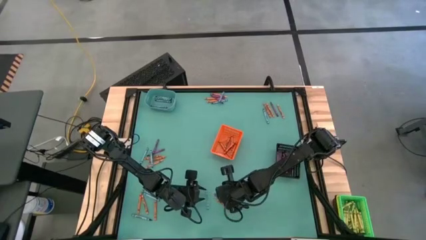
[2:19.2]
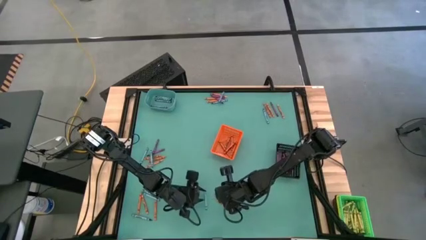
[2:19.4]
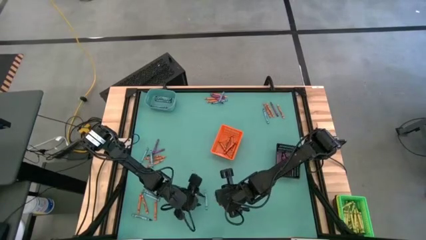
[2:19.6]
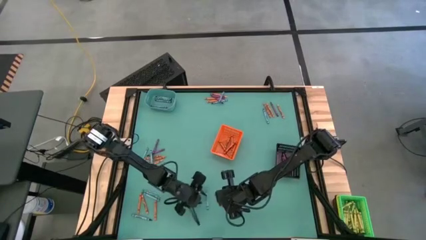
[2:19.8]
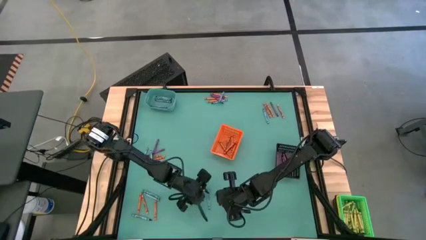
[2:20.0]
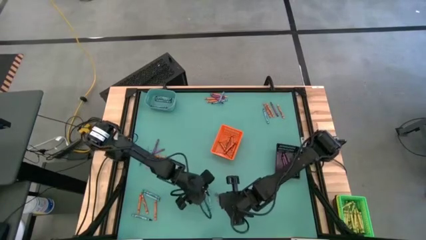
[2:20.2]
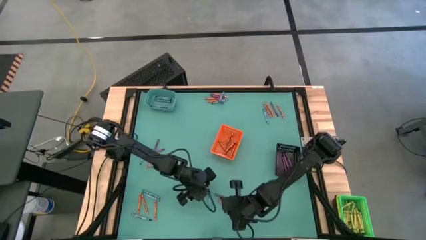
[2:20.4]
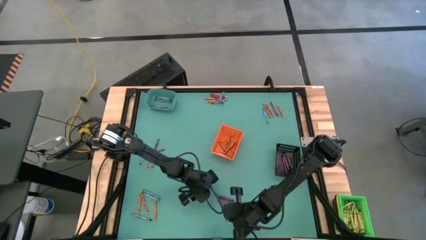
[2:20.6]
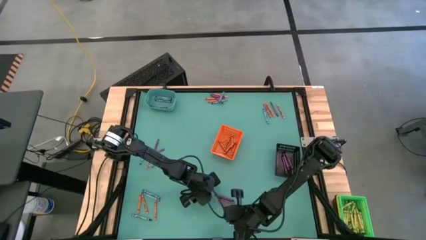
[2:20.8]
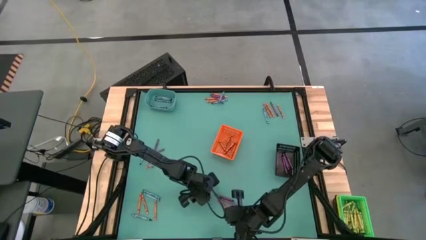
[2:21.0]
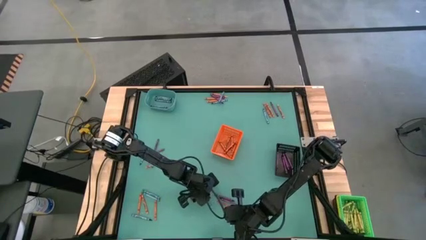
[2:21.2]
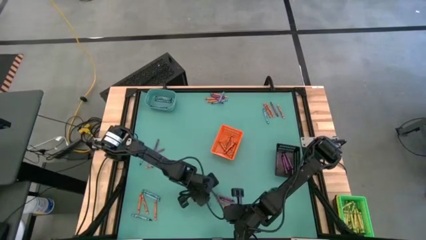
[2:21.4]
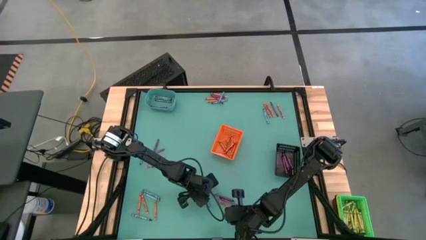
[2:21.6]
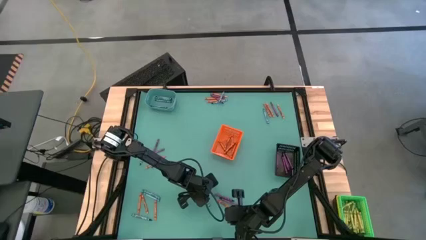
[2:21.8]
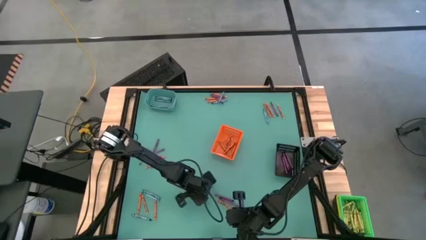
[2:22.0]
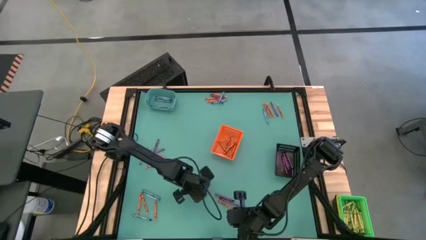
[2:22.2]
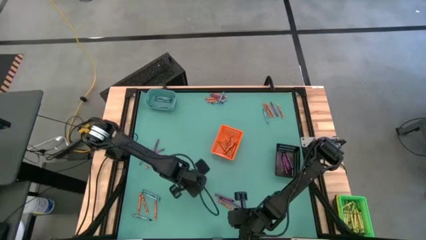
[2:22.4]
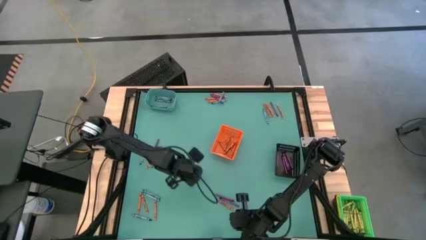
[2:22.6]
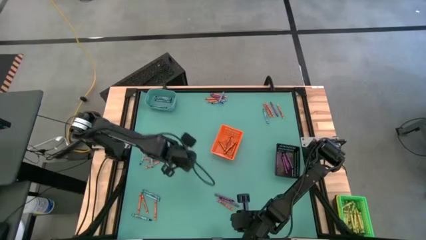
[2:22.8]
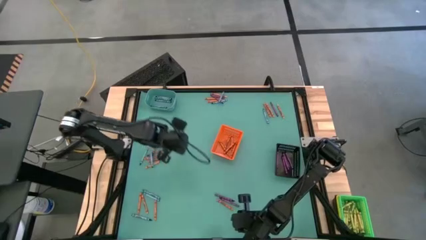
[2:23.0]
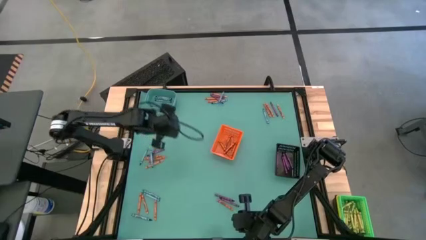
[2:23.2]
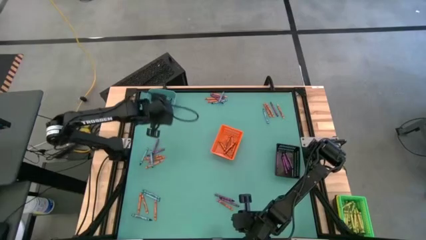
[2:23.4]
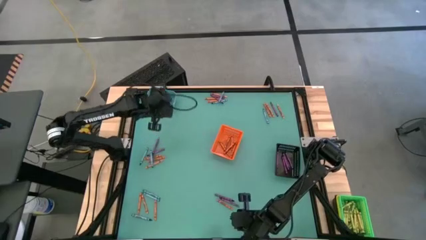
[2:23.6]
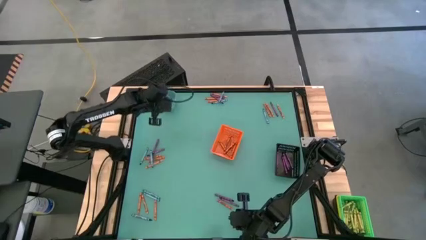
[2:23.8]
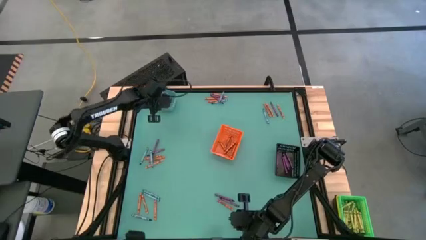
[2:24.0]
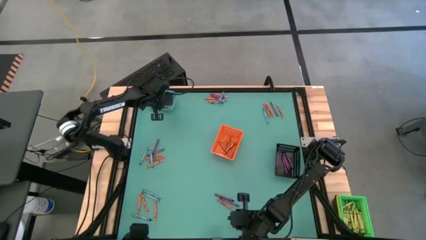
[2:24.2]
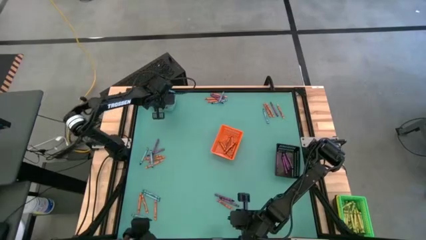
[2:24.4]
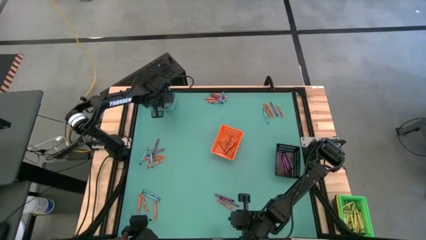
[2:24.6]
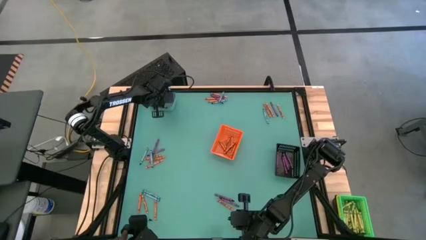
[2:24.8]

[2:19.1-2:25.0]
Task: Sort crayons
Put the blue crayon into the blue bin

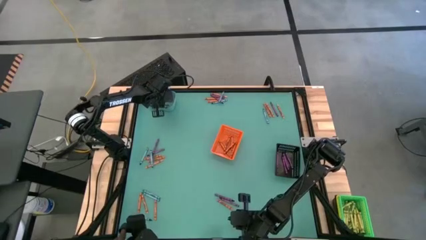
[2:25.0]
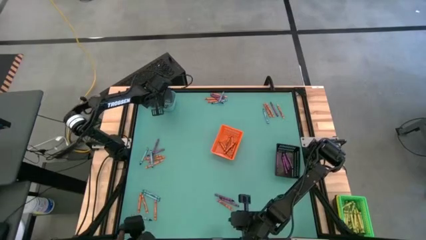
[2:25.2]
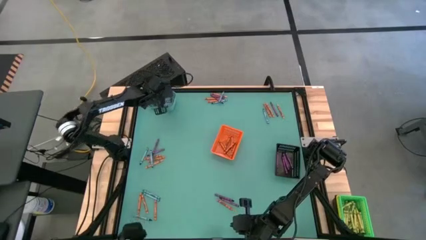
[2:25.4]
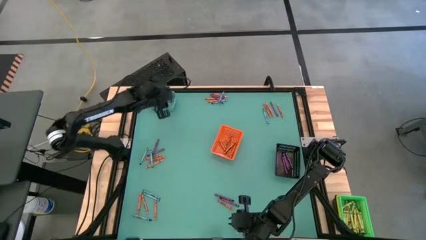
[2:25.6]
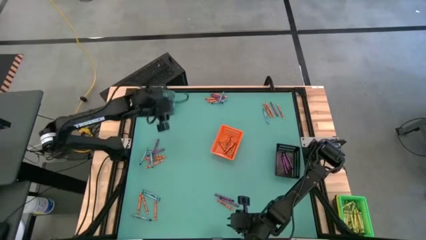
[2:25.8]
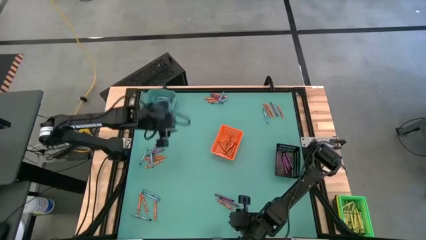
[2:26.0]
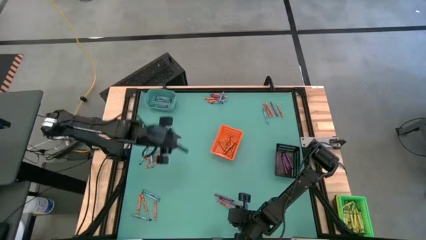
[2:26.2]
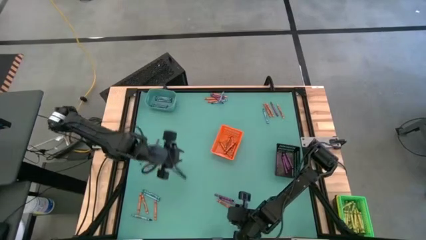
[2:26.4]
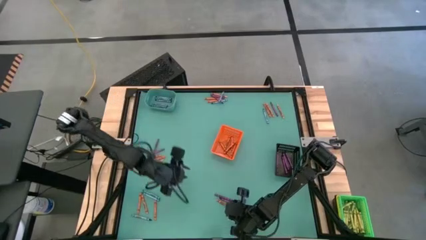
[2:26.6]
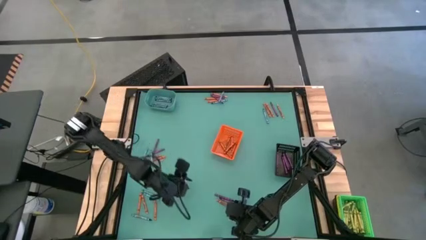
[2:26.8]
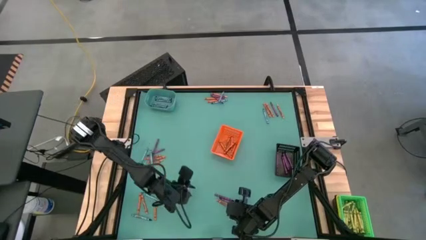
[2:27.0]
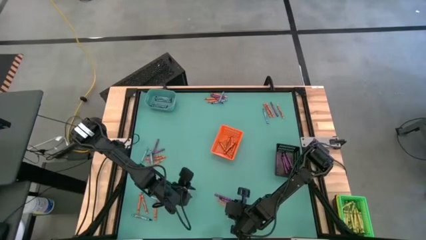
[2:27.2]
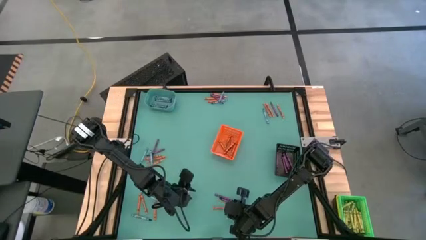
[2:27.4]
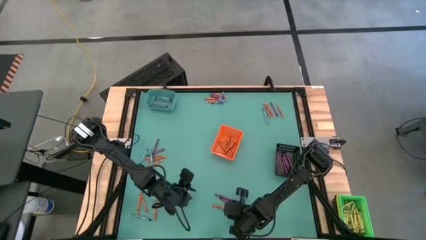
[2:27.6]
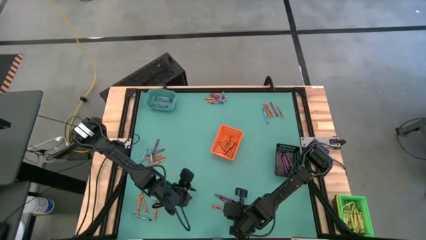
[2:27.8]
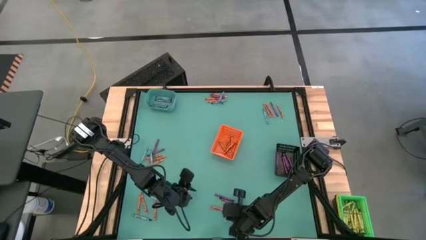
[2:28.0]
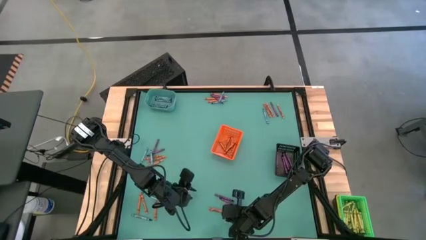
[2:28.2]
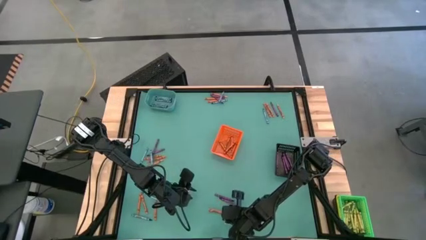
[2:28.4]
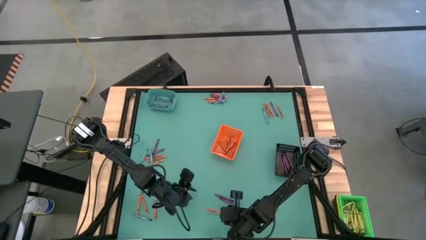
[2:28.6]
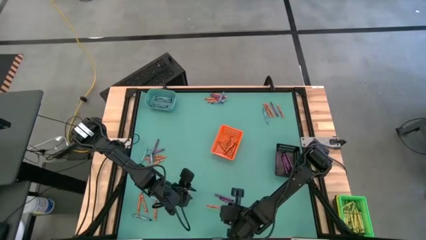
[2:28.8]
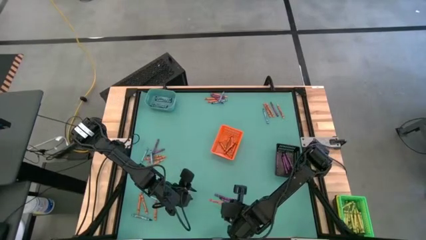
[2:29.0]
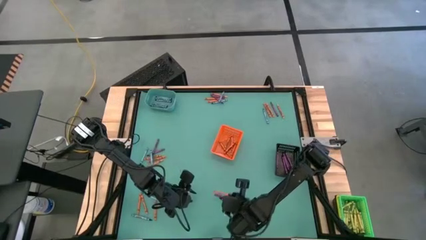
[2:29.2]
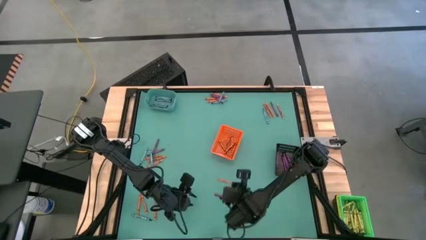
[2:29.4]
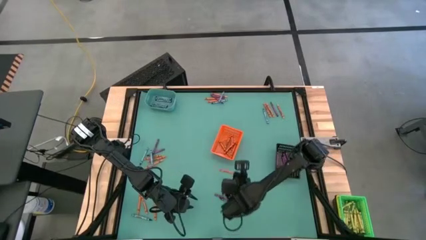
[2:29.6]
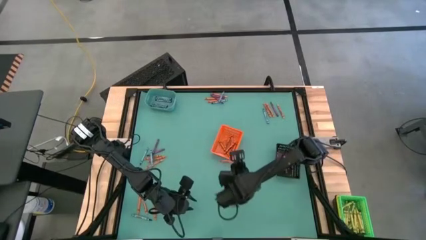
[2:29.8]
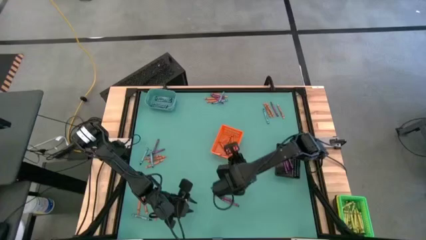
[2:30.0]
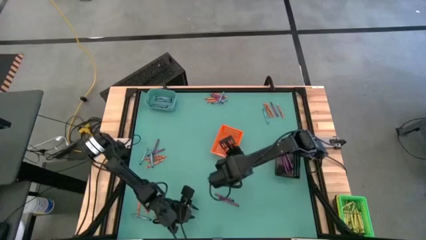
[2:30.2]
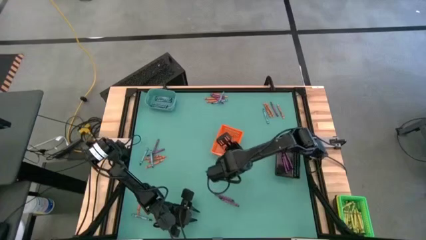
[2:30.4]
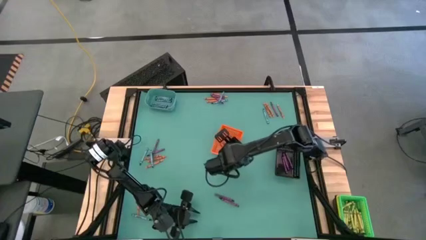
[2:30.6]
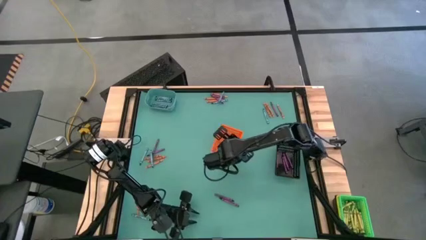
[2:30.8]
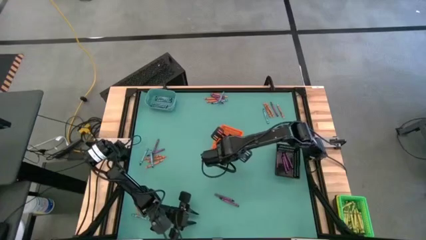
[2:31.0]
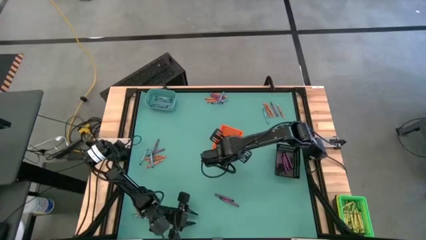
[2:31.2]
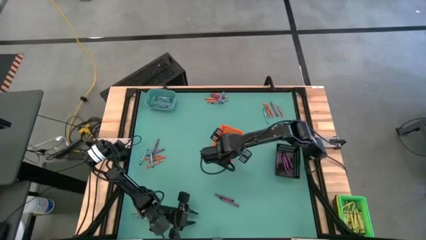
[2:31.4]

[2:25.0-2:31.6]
Put the orange crayon into the orange bin
